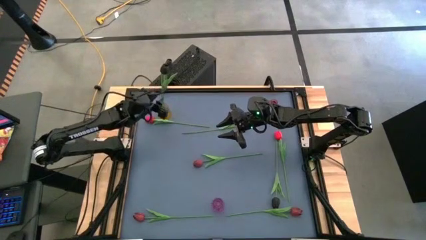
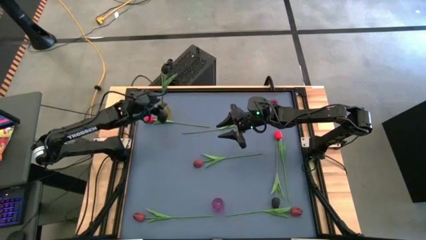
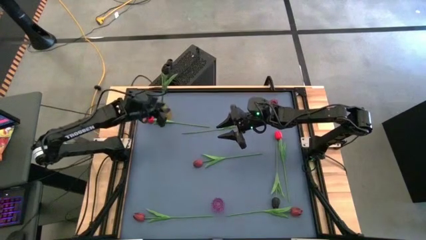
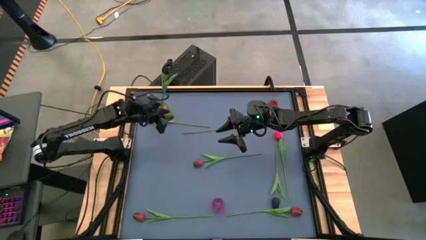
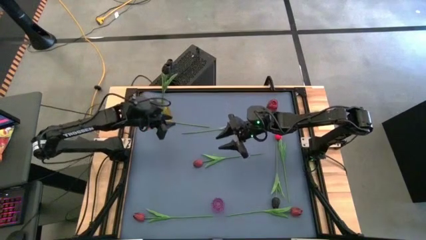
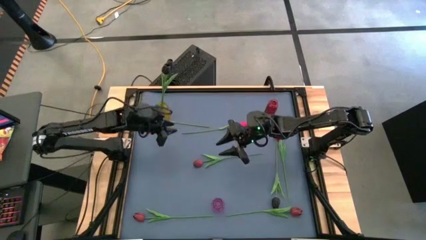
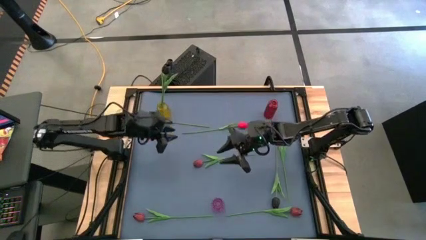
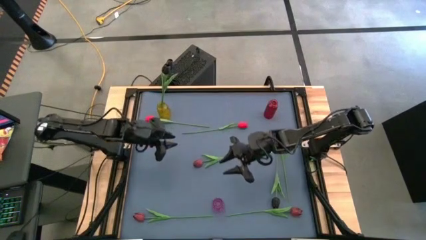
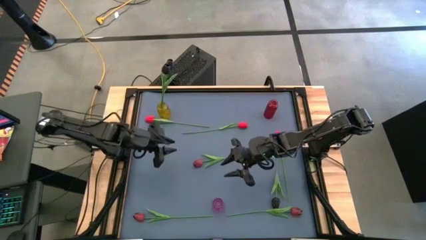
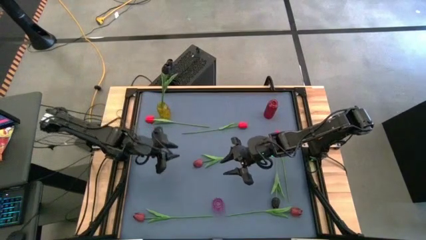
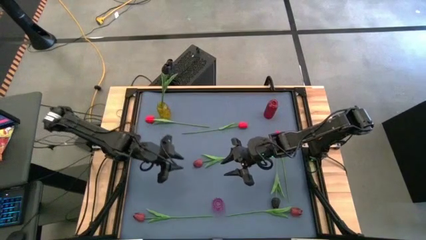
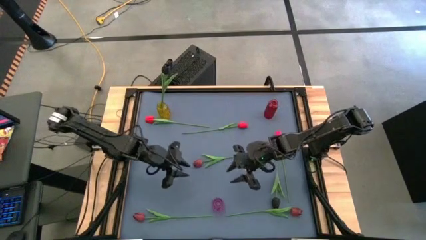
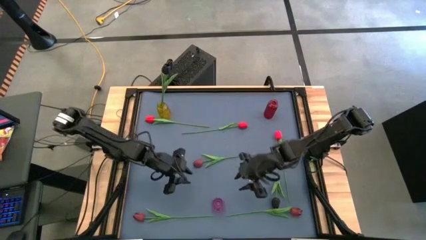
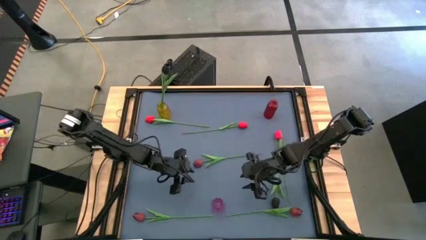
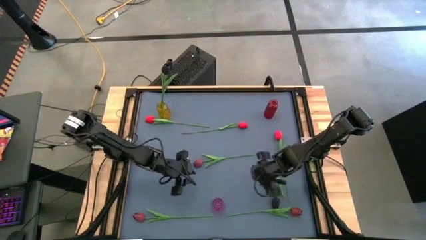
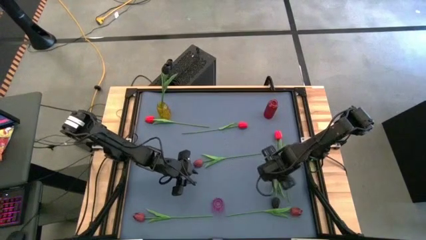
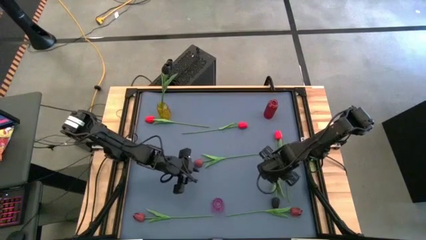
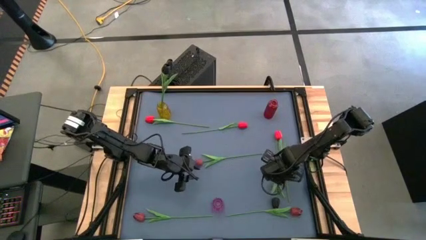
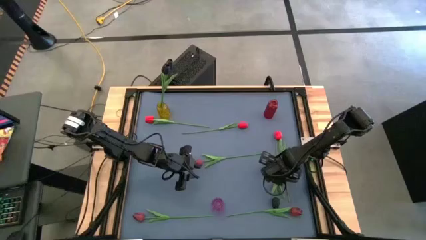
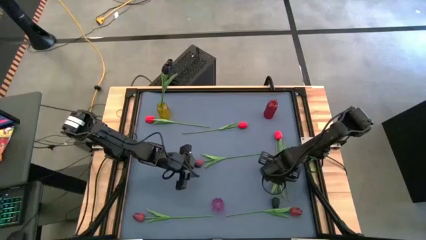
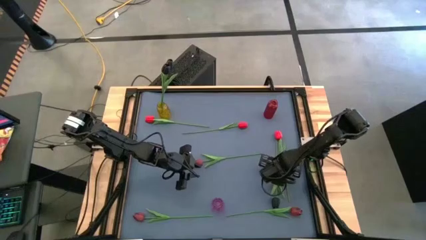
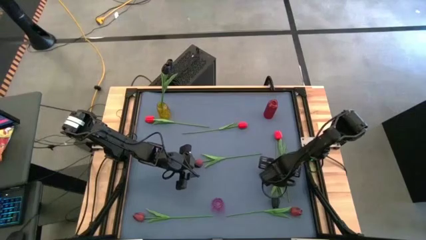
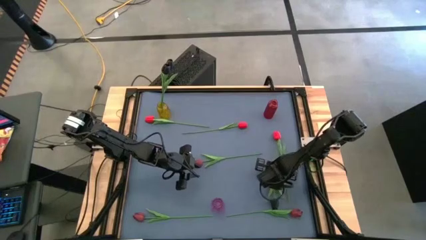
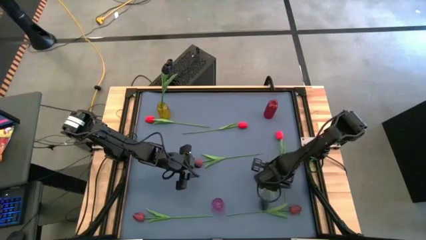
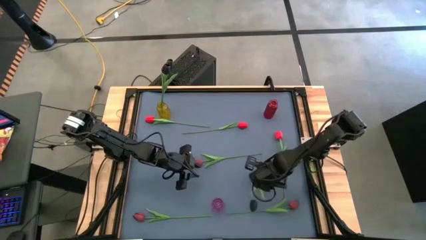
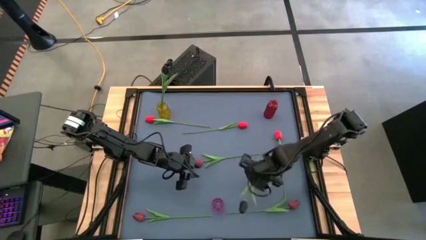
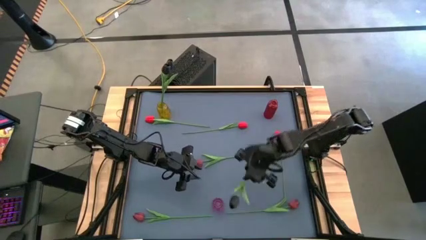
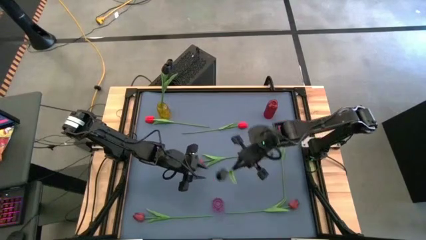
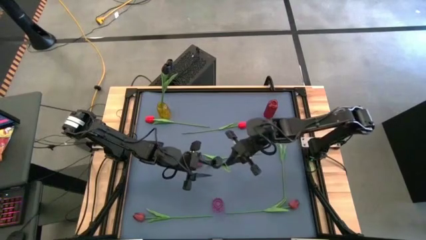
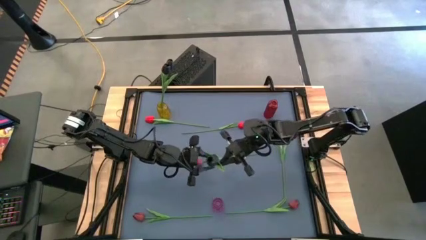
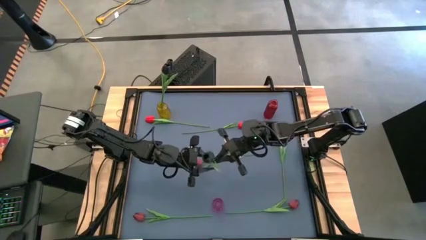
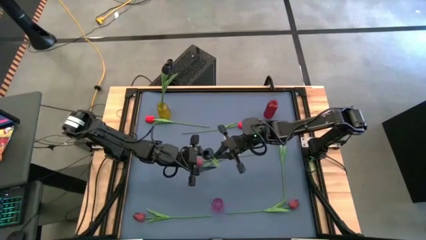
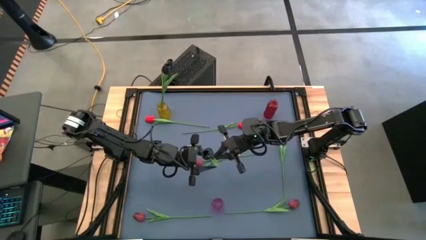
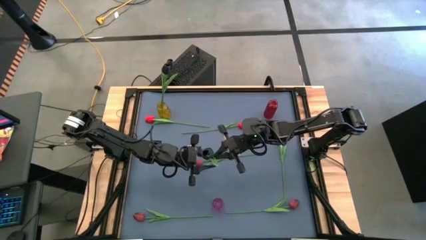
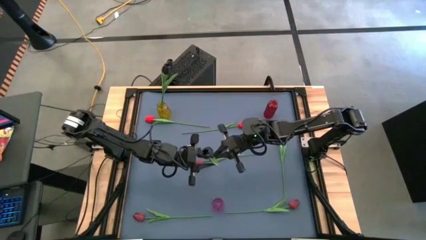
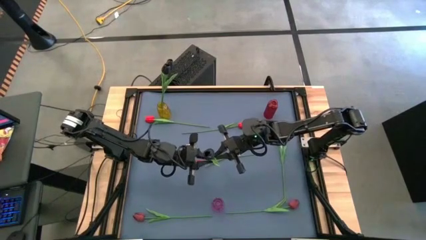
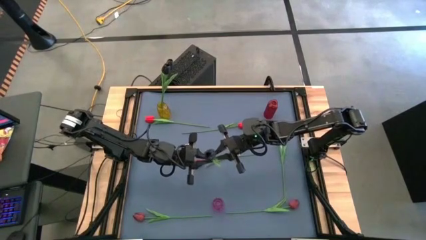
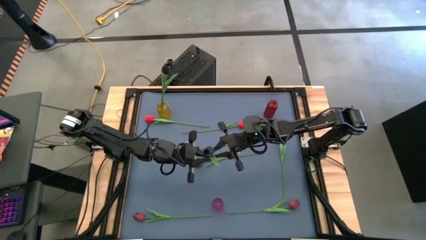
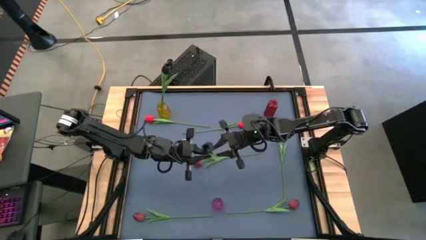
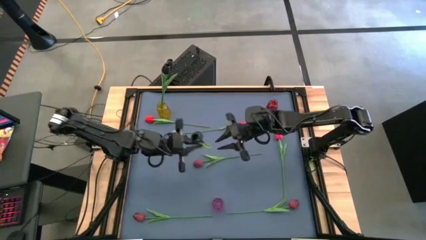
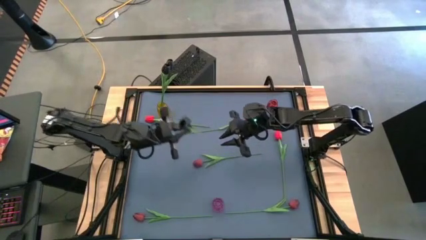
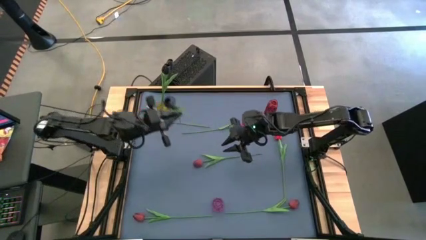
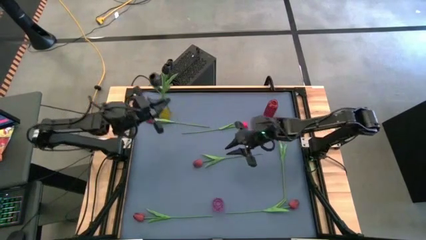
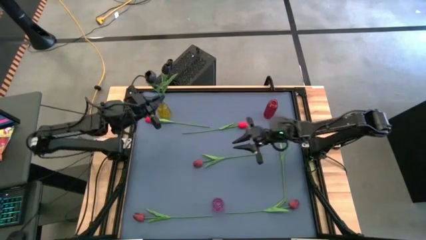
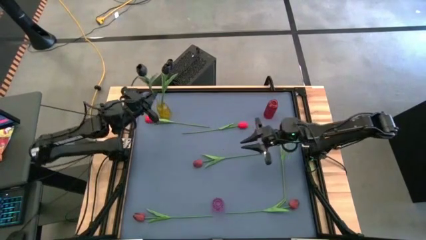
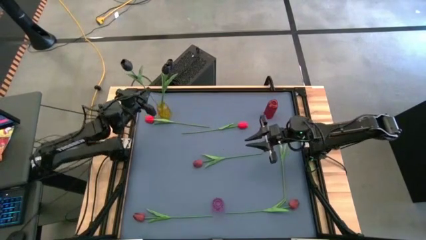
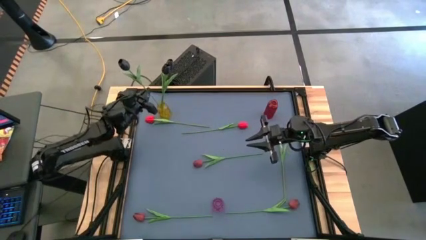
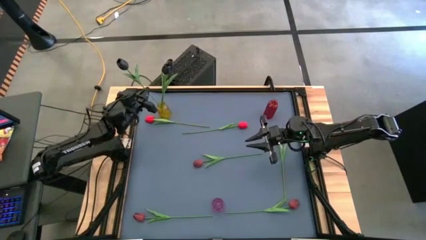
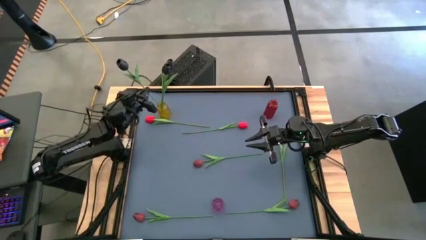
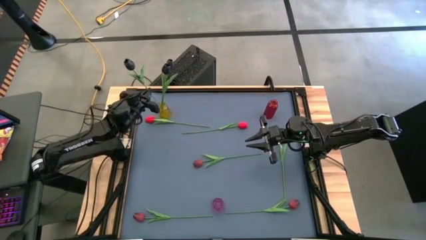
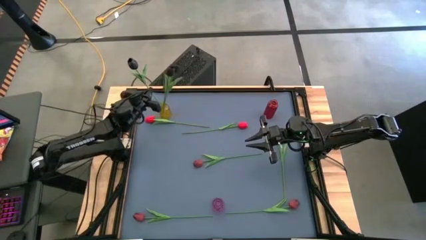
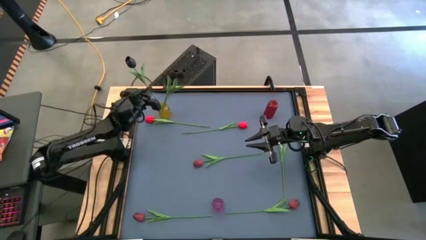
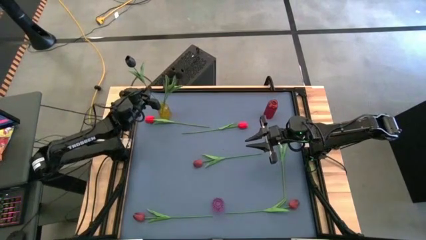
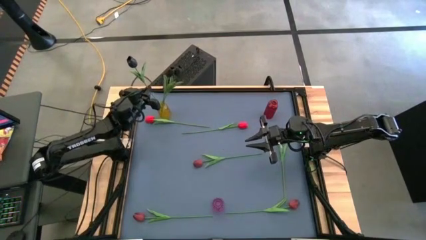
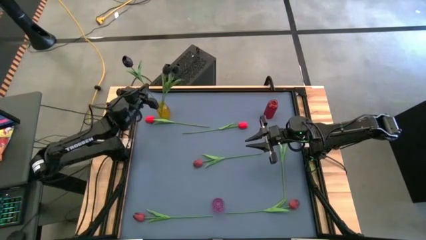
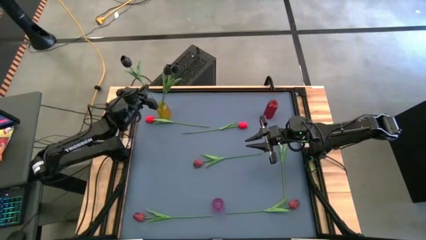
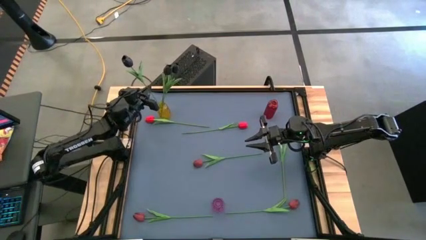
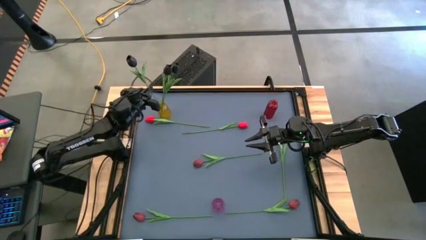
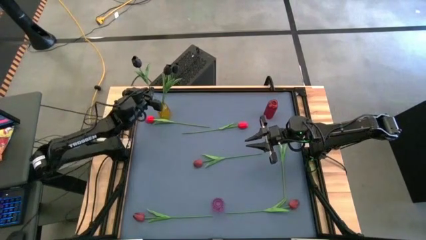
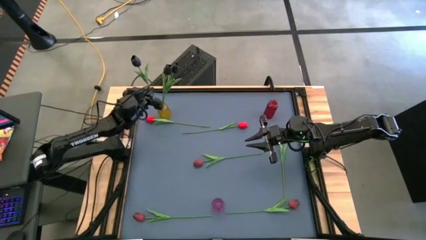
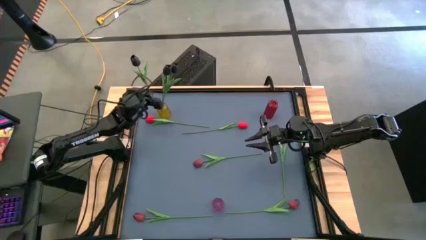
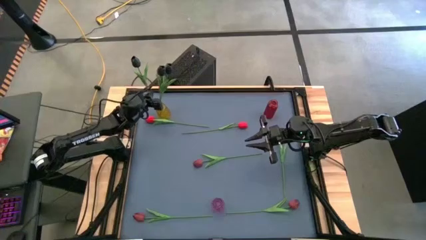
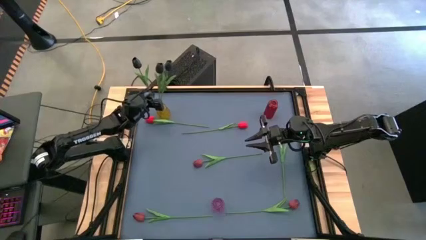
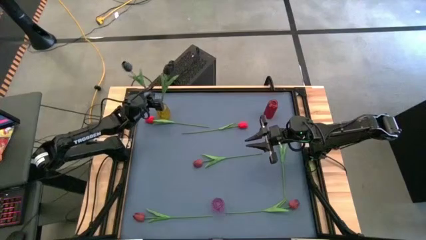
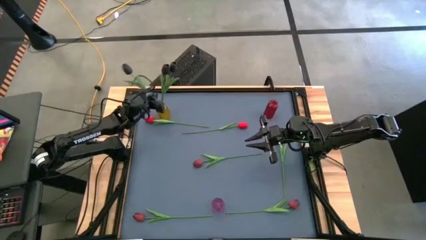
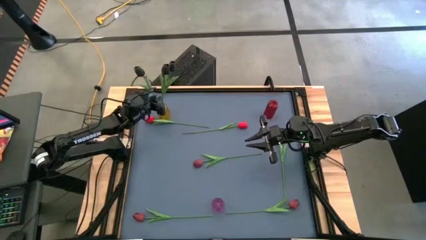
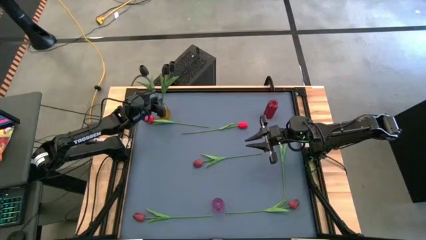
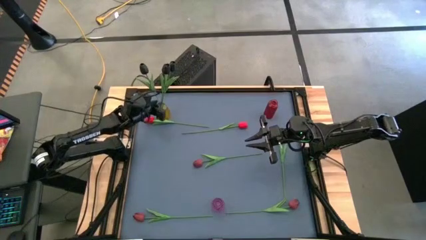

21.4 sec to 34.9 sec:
Task: Sort flowers into vase by color
Put the black flower into the yellow vase
